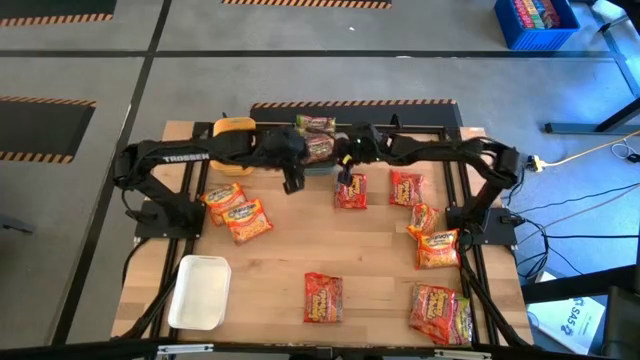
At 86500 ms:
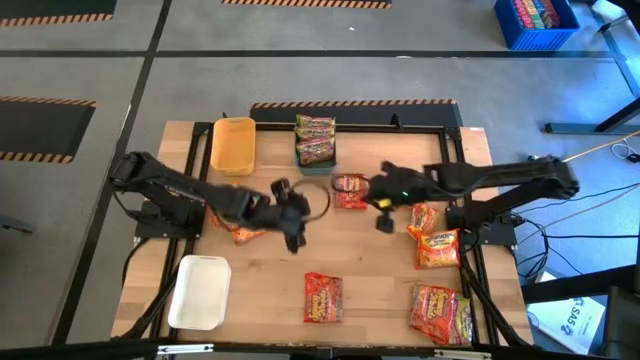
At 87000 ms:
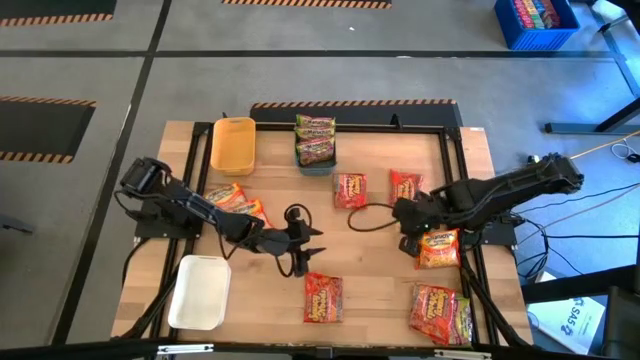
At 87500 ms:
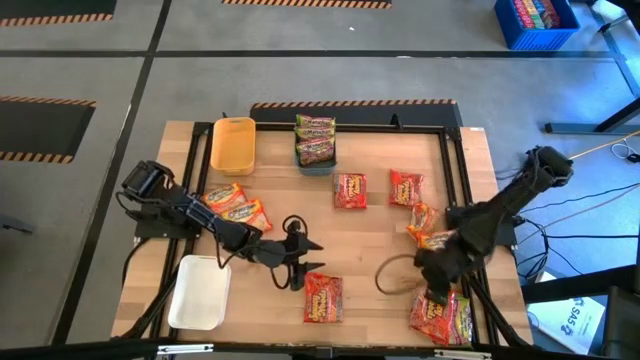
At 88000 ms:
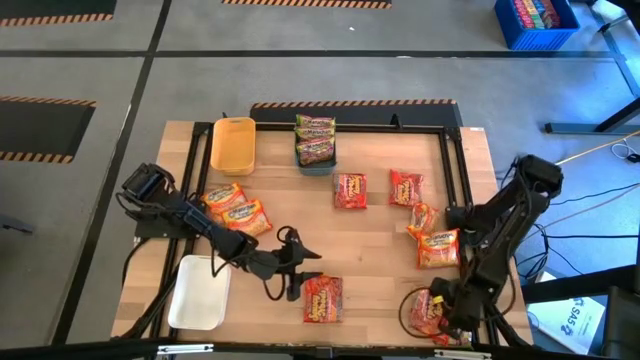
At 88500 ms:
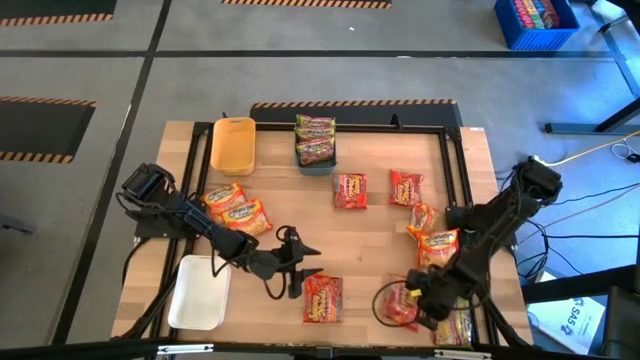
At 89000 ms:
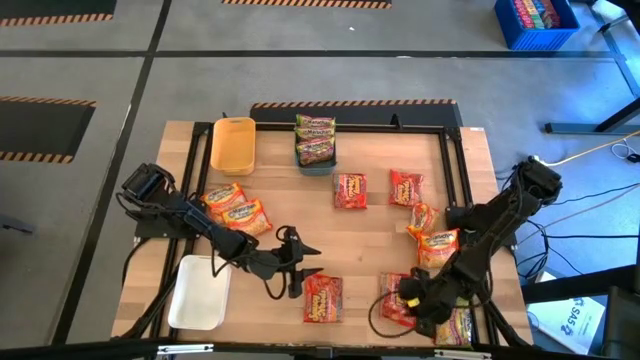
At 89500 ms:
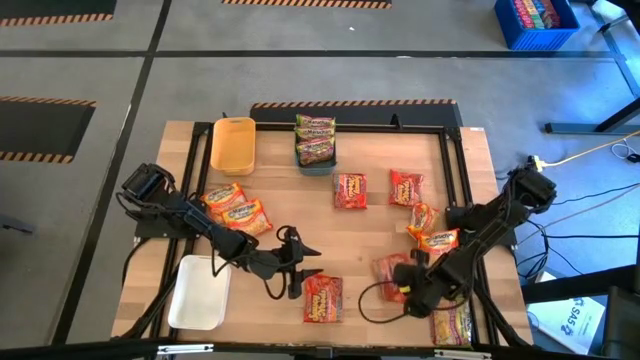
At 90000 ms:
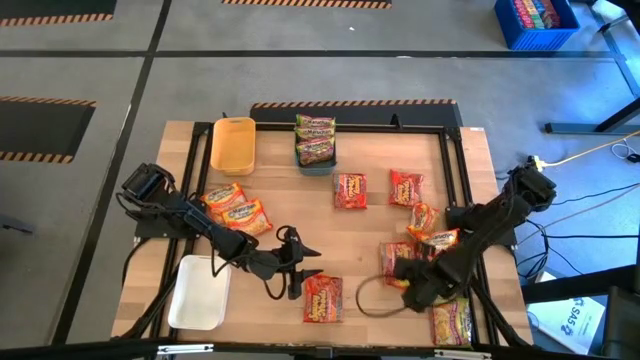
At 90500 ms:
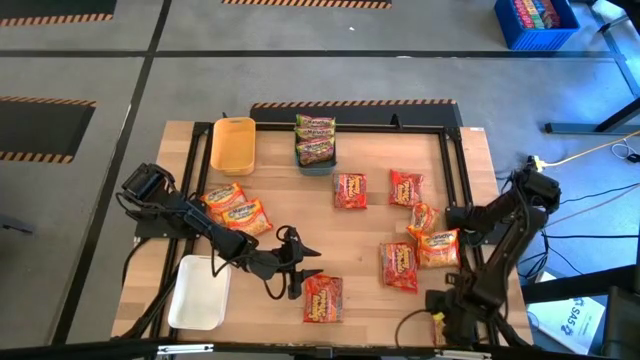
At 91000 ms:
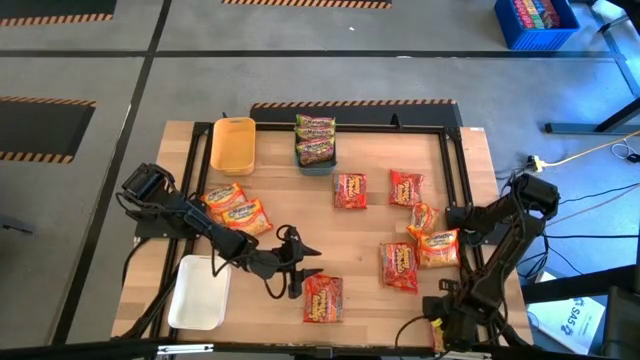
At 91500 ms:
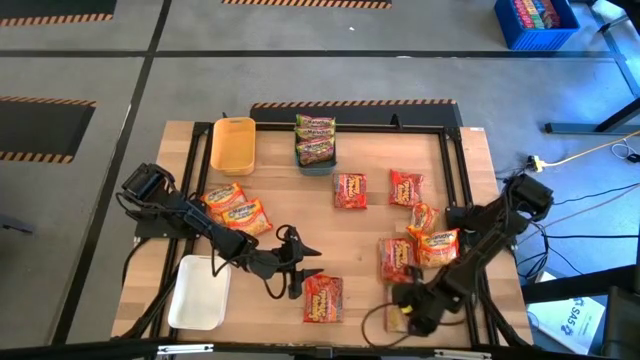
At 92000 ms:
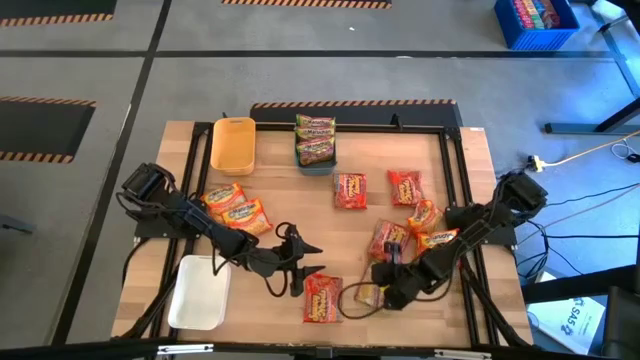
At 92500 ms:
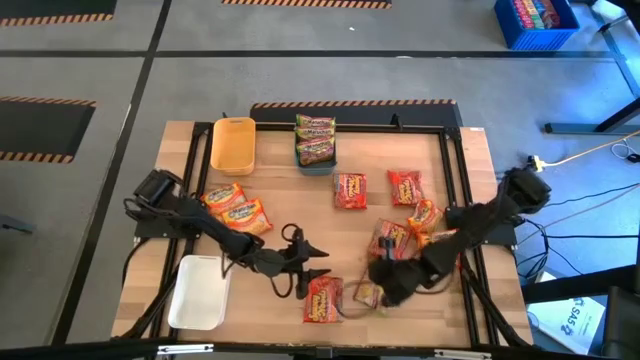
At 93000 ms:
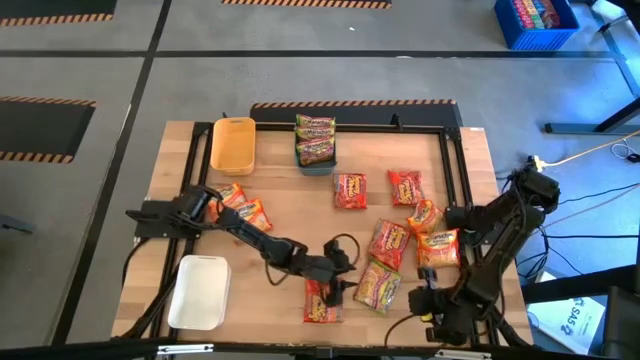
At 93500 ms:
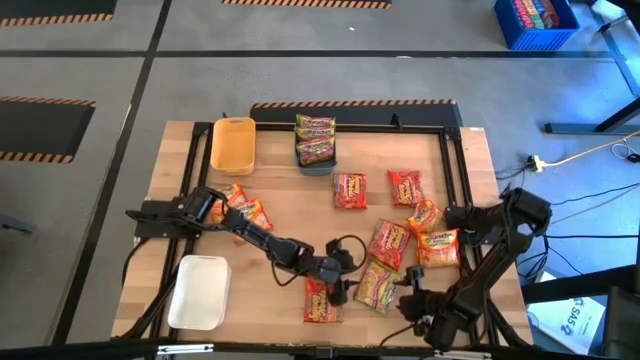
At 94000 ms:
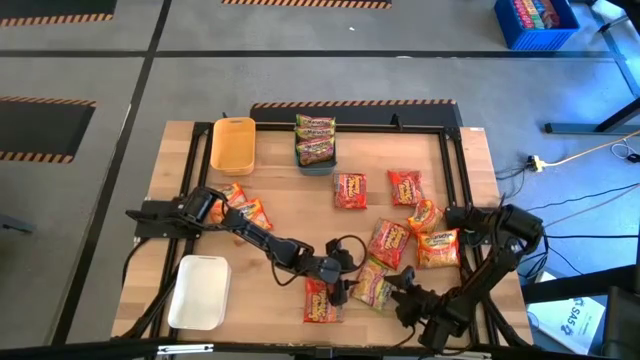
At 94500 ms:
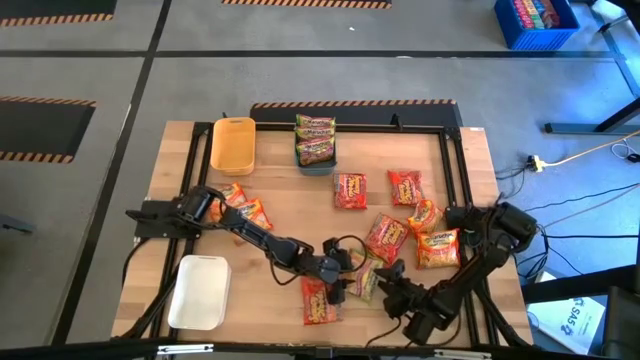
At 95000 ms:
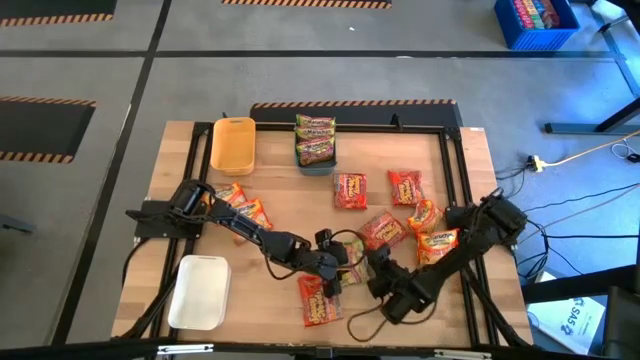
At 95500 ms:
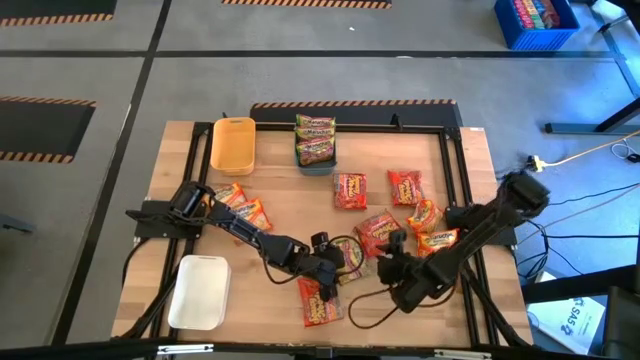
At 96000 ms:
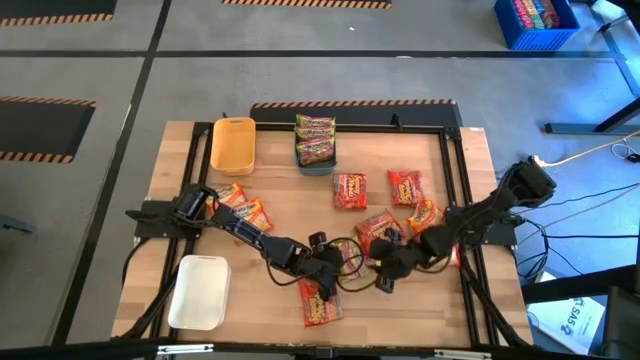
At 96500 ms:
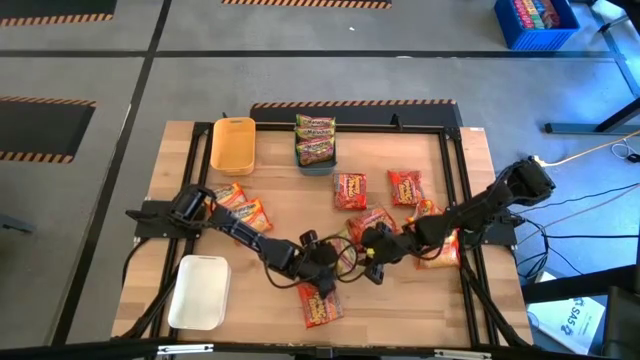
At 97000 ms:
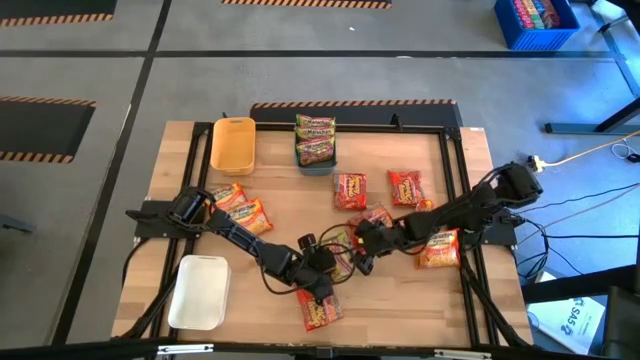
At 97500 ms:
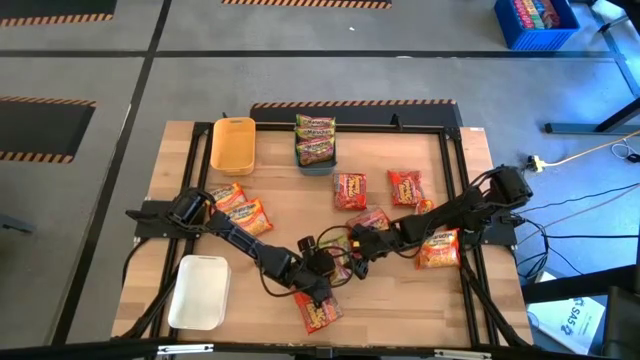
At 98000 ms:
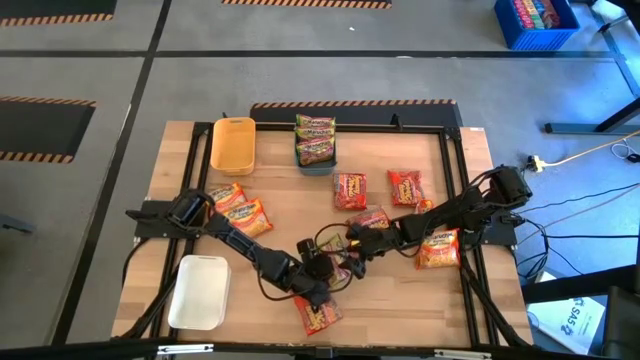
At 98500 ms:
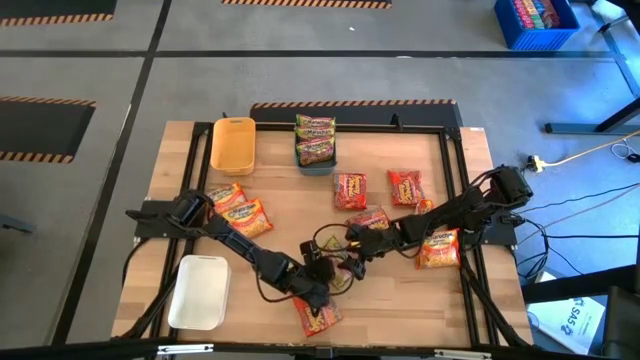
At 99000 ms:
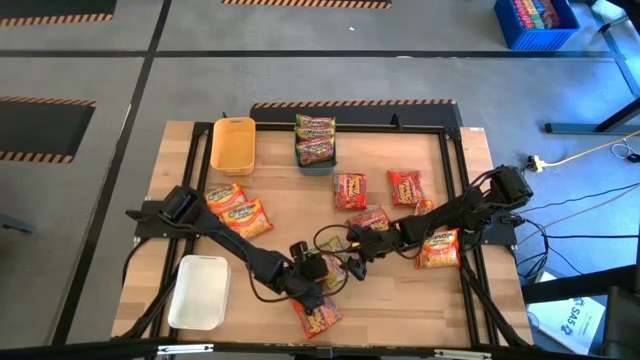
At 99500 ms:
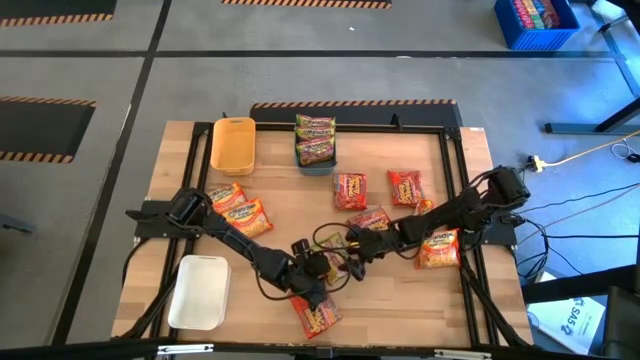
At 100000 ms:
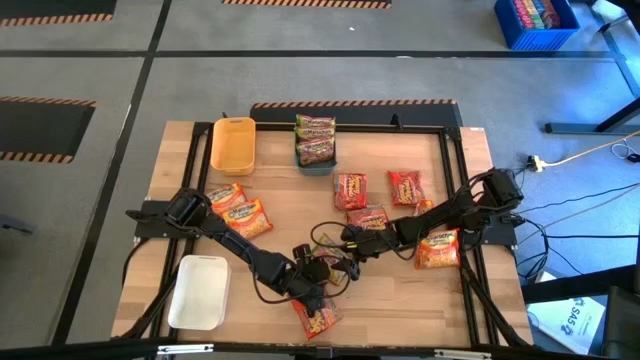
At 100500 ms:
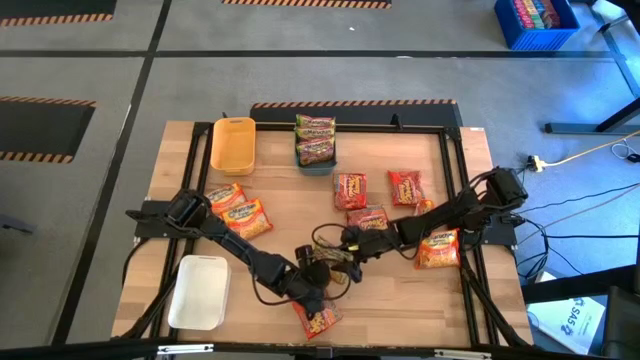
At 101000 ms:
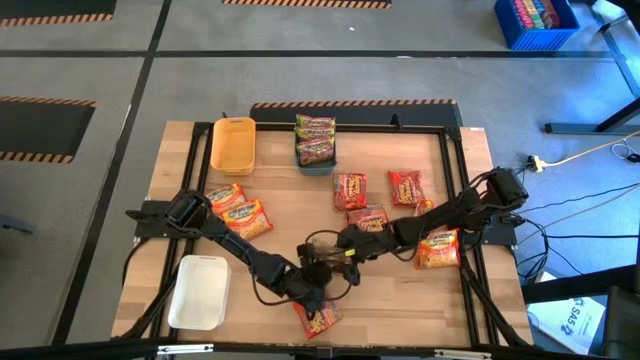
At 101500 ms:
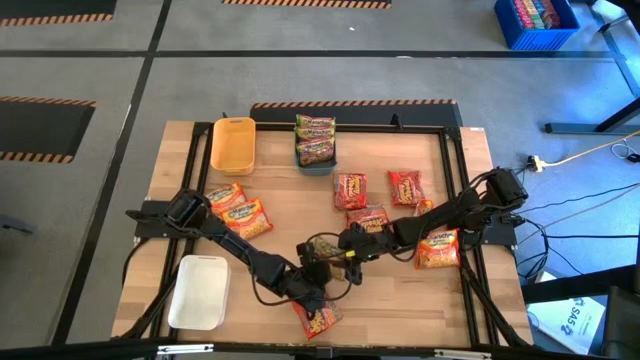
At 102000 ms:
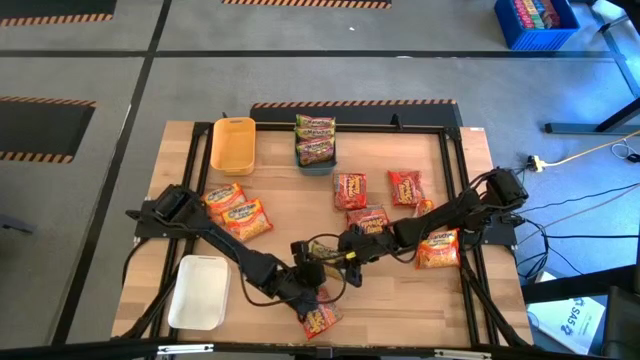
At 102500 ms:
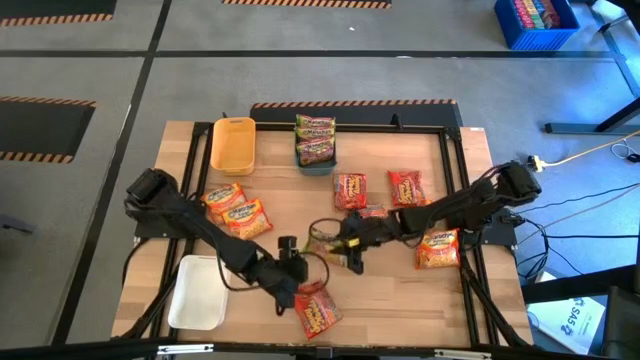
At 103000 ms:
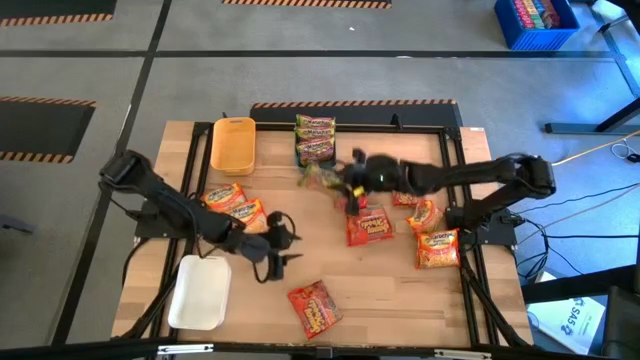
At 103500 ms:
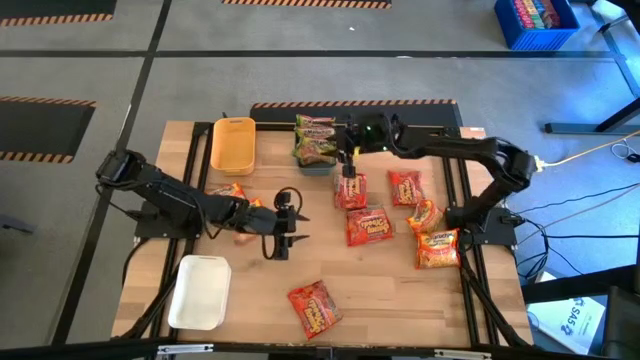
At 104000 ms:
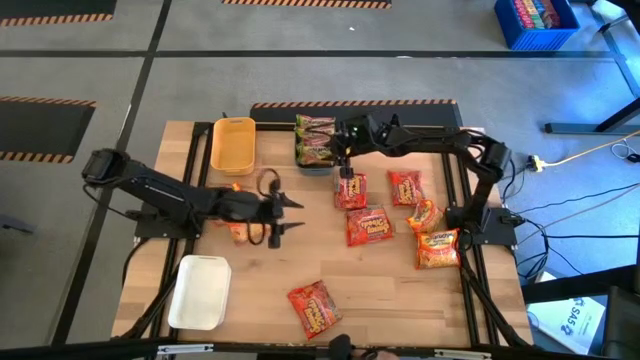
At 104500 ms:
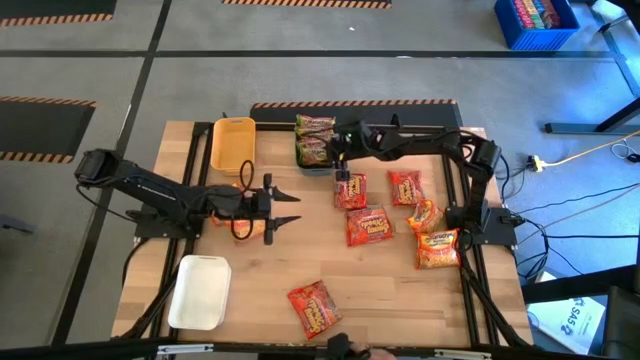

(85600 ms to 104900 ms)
Task: Sort Maruchan noodles
Put the green noodle pack into the blue bin
